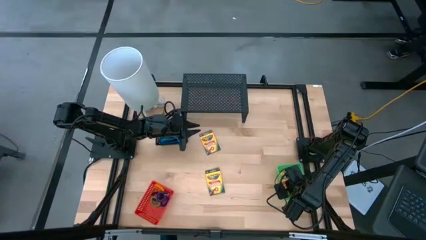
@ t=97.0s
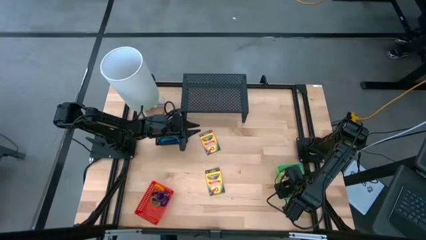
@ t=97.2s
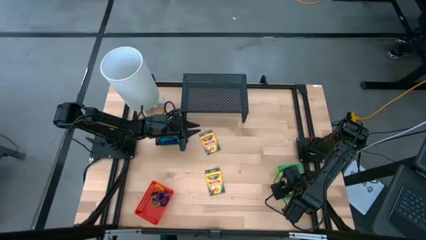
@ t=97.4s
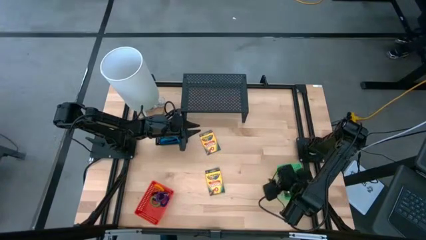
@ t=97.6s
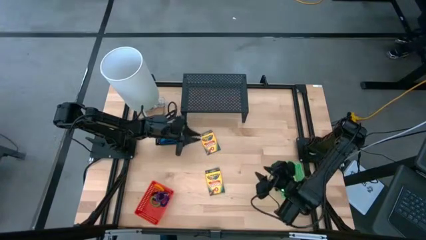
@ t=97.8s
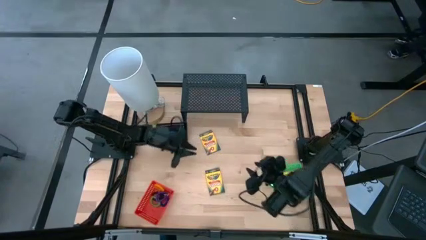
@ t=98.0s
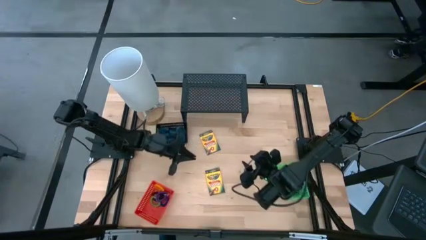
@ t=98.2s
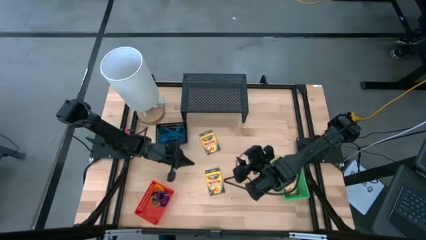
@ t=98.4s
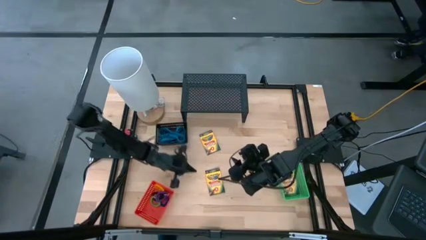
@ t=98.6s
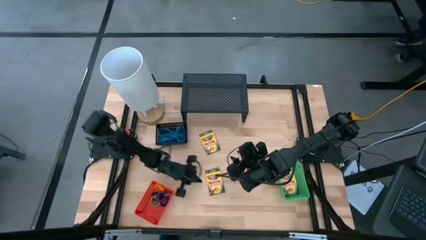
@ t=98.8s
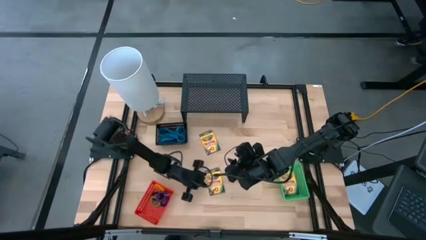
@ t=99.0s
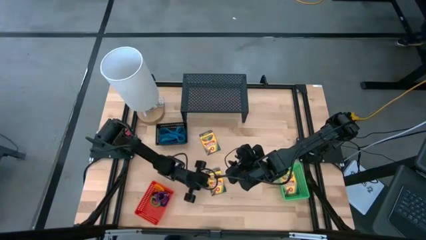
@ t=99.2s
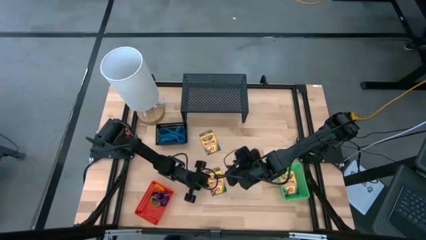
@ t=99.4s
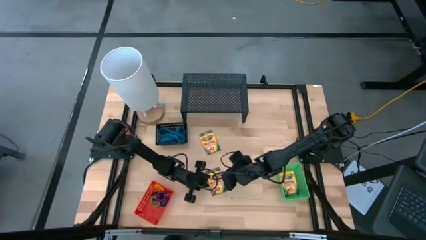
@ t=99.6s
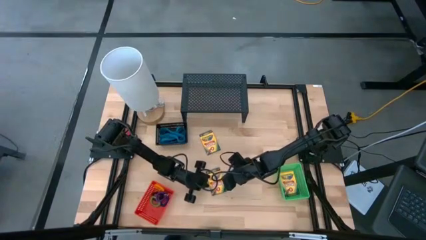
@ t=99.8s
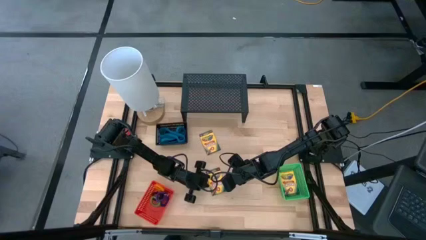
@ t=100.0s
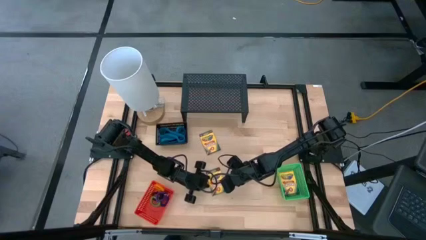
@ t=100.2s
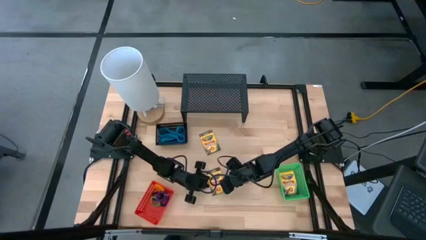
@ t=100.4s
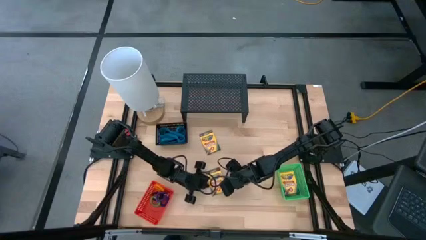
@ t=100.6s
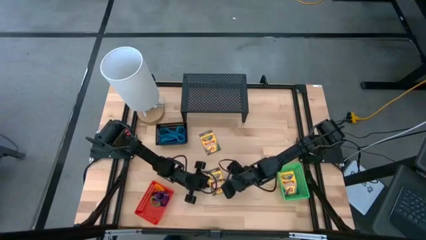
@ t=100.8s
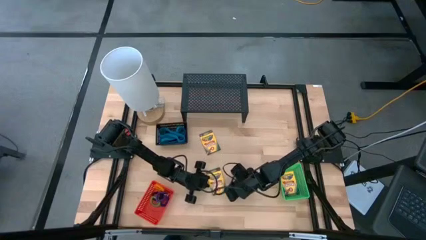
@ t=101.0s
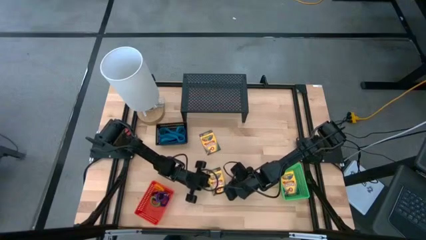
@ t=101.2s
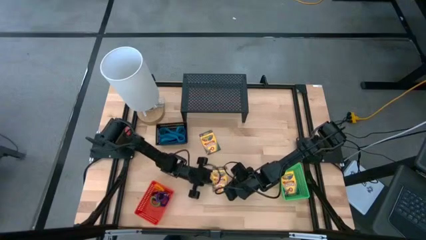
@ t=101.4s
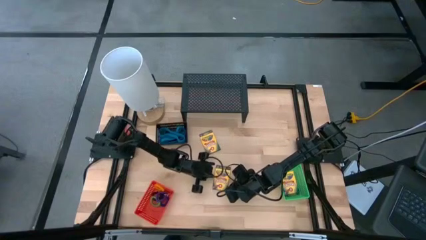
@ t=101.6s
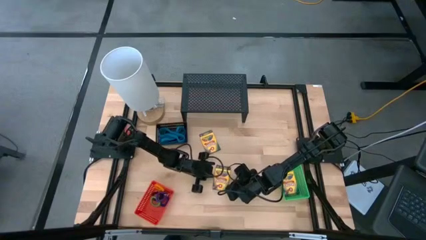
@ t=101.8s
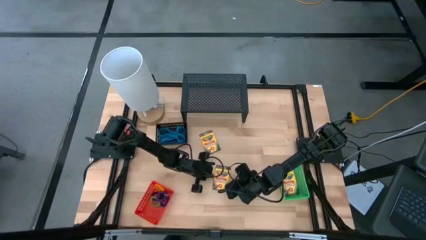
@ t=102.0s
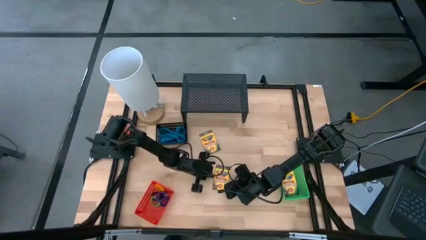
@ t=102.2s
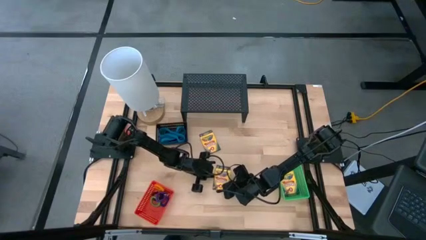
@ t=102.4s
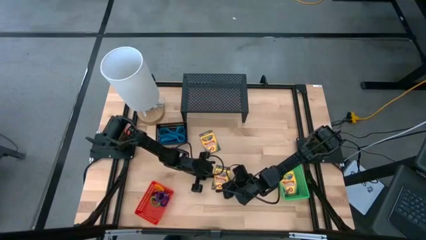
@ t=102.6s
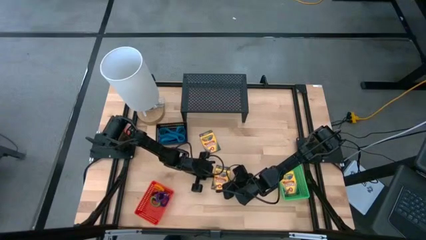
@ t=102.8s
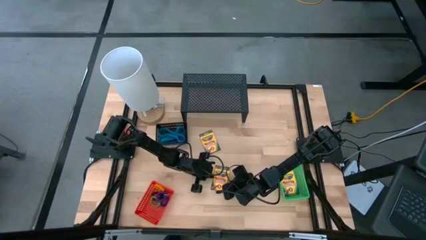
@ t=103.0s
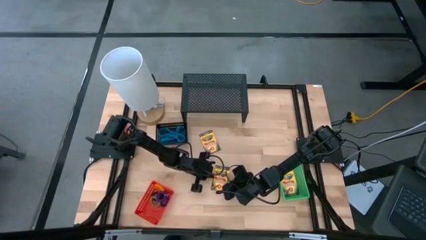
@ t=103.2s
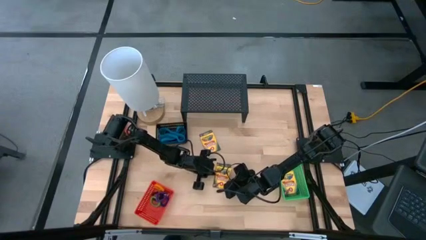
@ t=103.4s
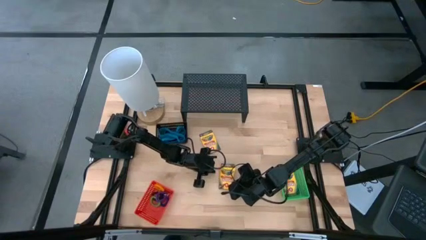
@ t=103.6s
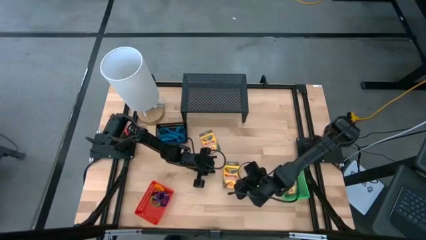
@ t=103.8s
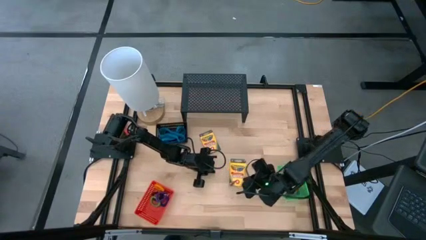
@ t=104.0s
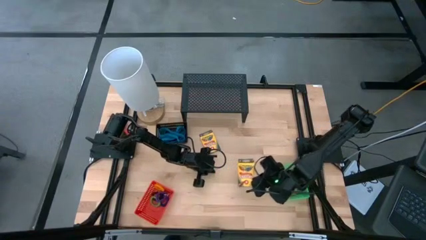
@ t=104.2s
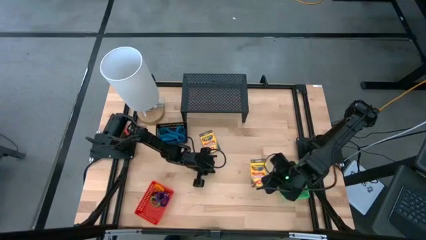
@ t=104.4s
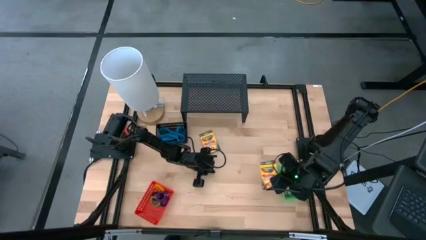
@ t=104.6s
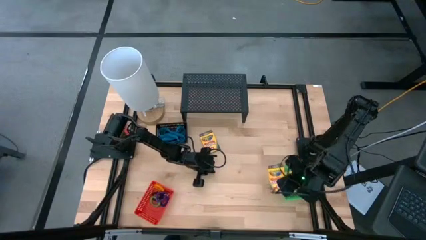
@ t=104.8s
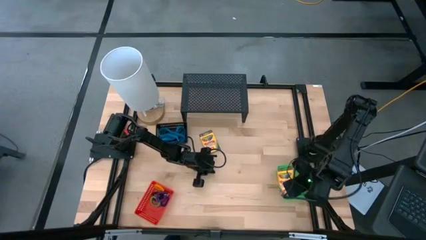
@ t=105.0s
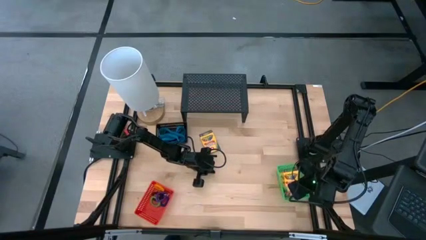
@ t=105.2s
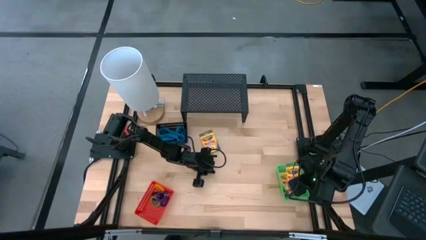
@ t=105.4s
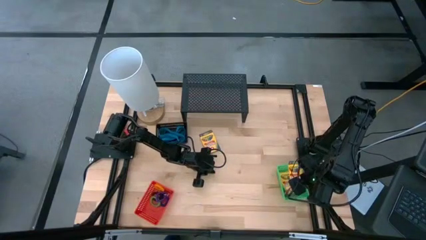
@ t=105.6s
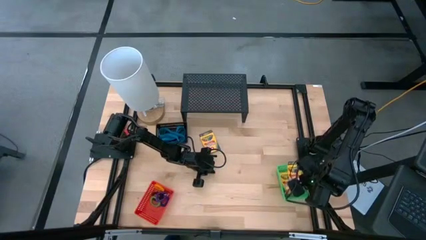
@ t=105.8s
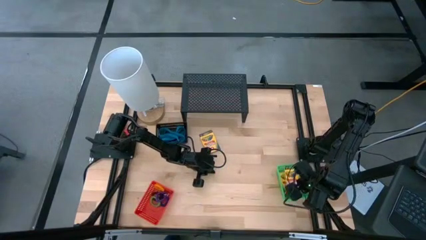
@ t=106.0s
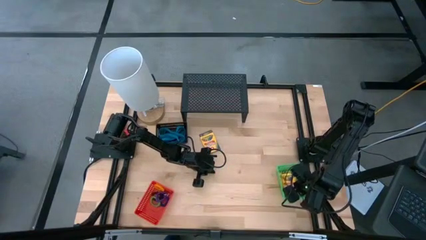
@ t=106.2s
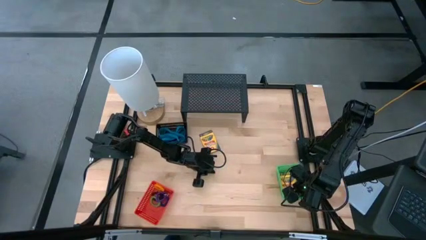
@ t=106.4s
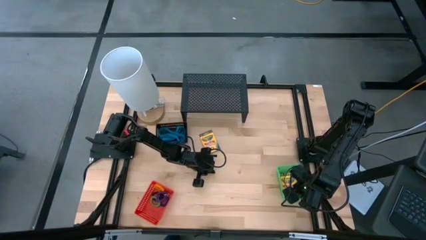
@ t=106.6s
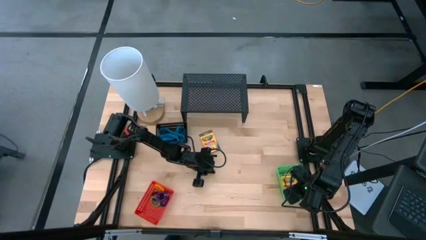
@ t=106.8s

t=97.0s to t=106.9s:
Task: Pick & Place Office Desk Supplies
Put the bottom crayon box into the green bin

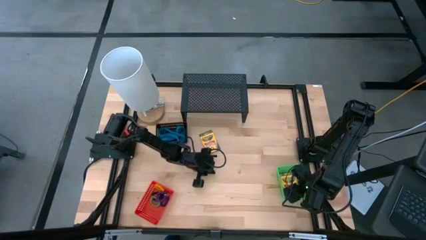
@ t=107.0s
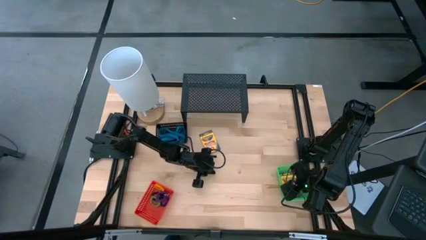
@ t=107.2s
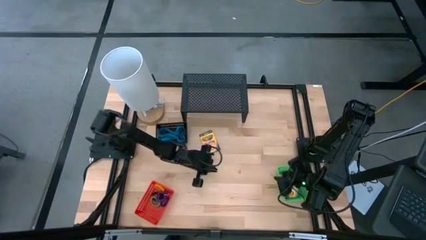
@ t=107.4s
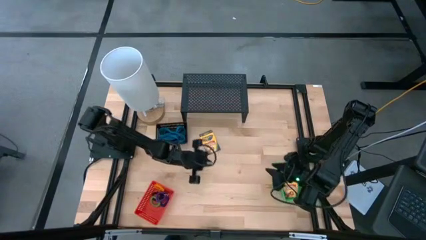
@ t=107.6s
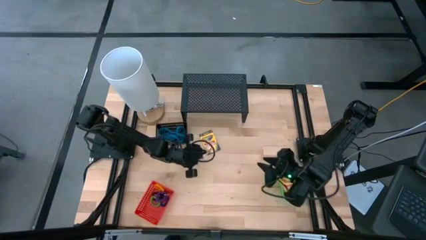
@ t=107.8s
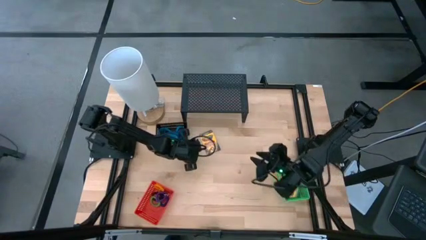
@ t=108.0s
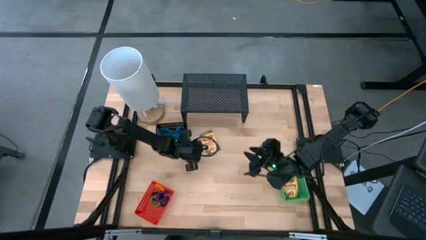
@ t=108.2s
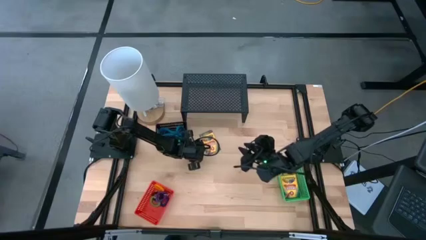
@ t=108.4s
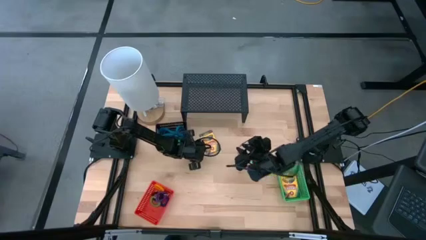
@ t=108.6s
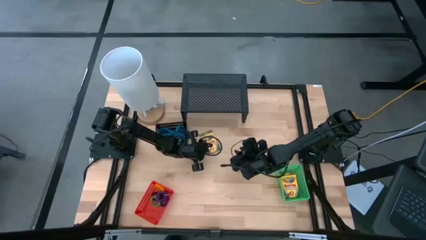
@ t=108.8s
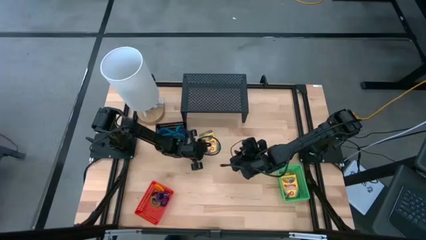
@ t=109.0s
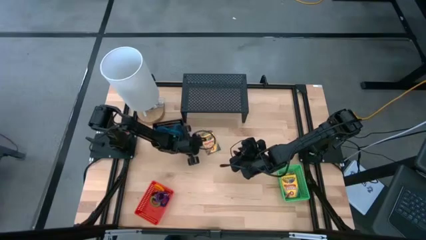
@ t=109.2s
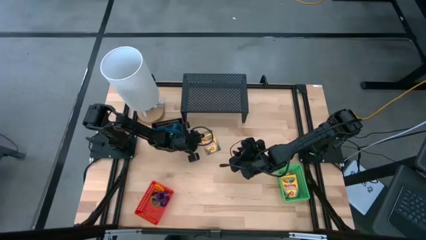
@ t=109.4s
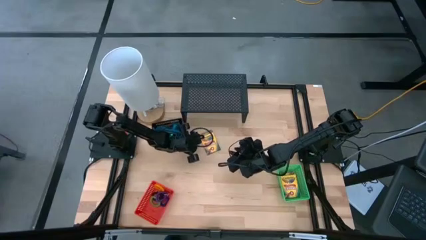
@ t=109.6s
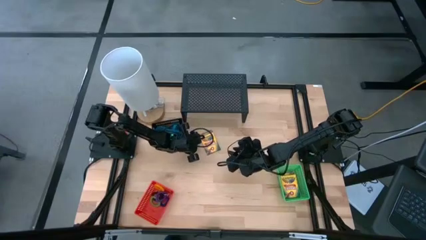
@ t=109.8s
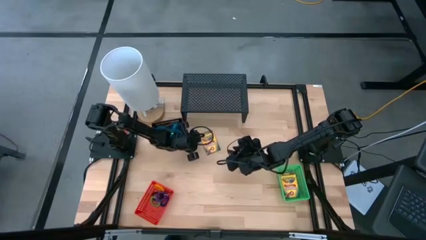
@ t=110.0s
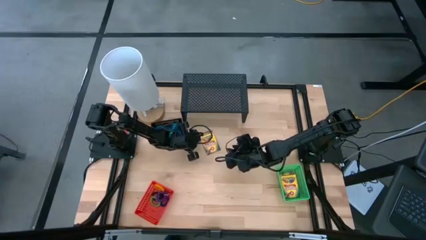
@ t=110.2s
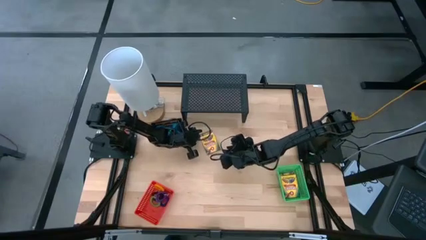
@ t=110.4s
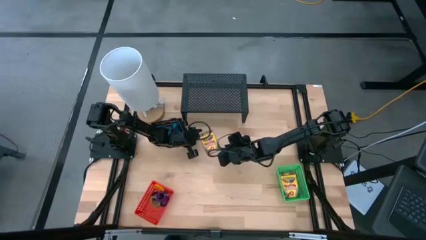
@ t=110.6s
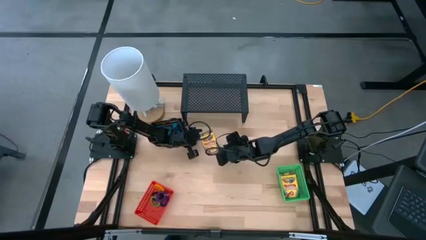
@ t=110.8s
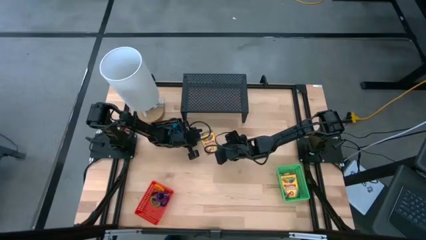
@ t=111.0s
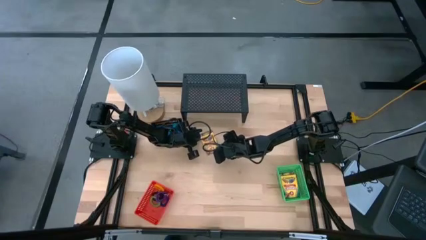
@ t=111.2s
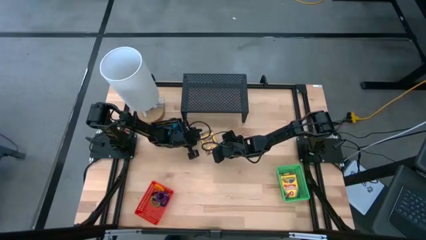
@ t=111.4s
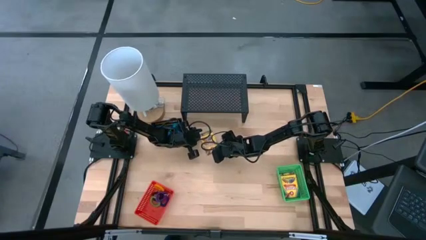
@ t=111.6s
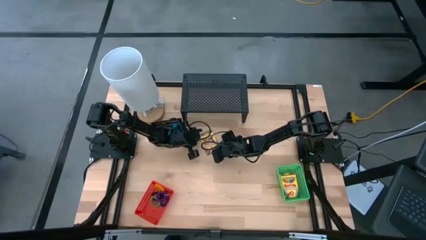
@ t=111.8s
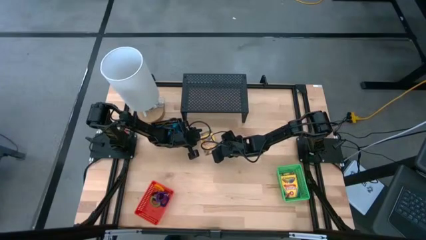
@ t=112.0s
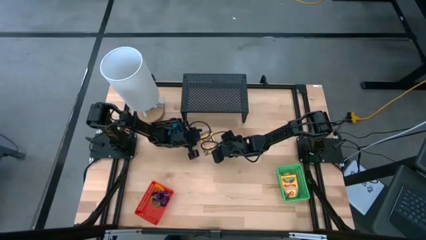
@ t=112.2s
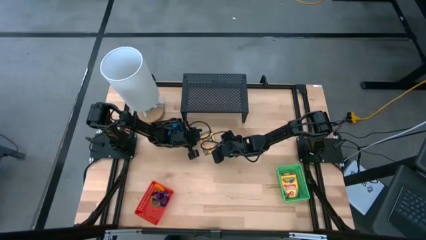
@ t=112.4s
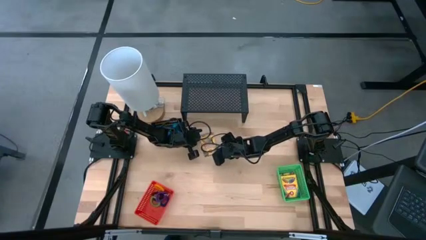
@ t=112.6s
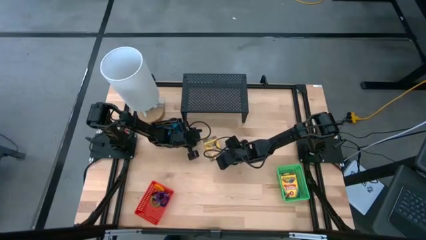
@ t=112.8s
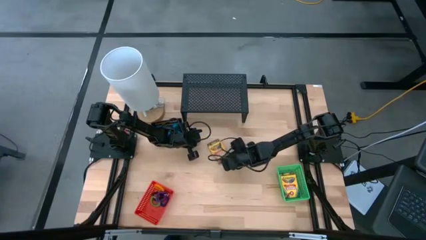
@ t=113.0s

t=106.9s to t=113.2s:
Put the crayon box into the green bin

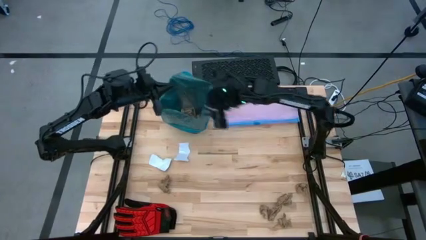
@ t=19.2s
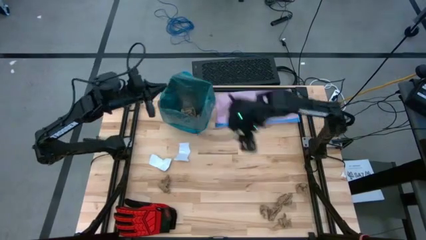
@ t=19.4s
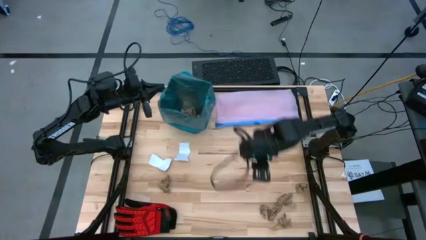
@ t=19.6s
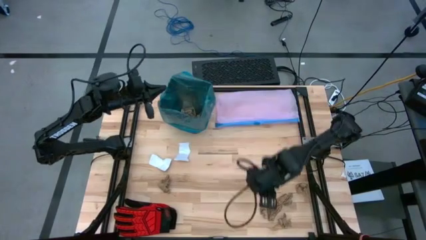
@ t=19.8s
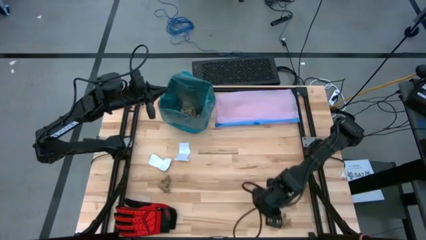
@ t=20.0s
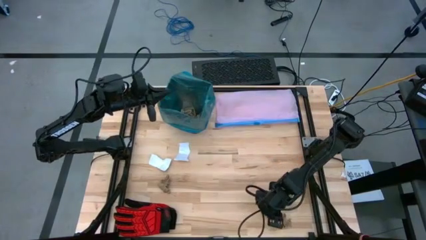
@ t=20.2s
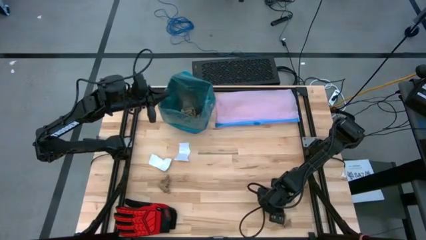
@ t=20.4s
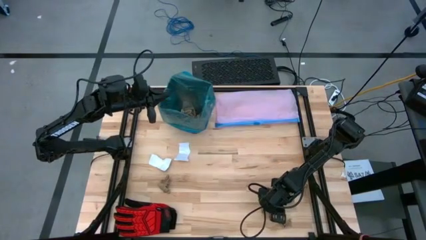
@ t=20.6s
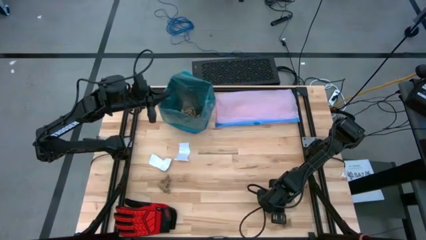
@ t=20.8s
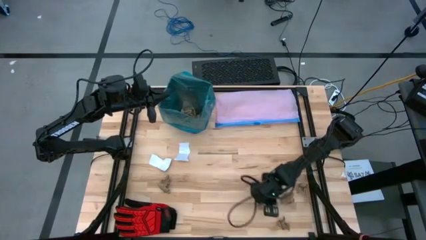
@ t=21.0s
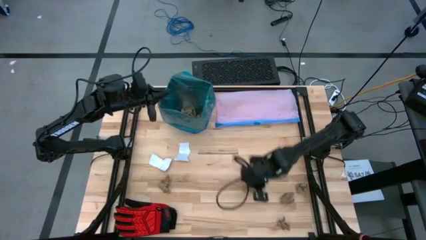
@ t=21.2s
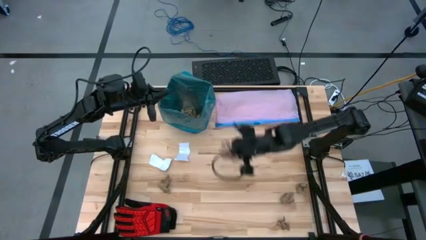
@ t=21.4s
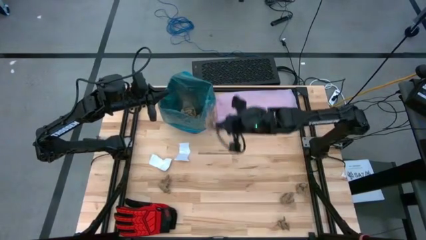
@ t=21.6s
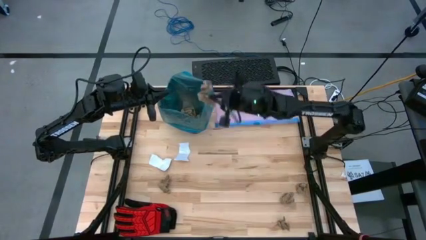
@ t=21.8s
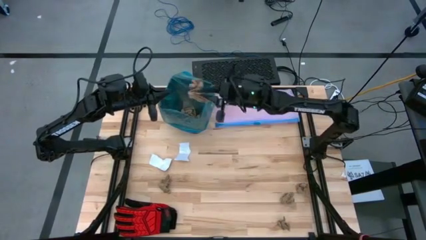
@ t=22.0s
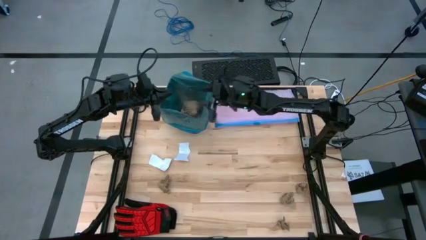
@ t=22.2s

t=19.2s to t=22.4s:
Task: place trash/remove bag and relplace
Put the brown napkin into the trash bin
